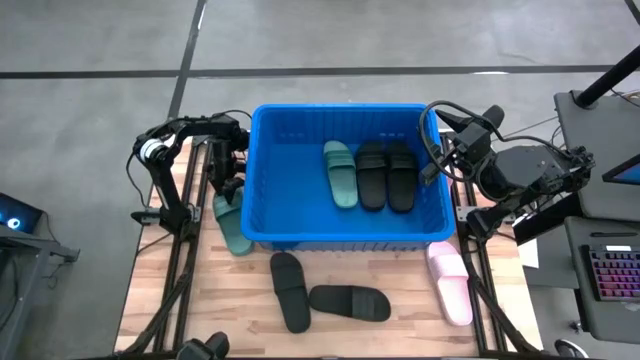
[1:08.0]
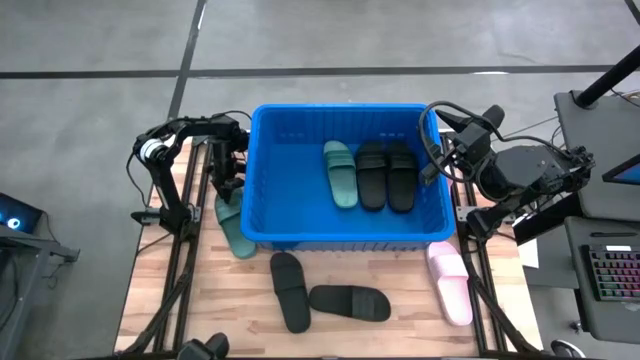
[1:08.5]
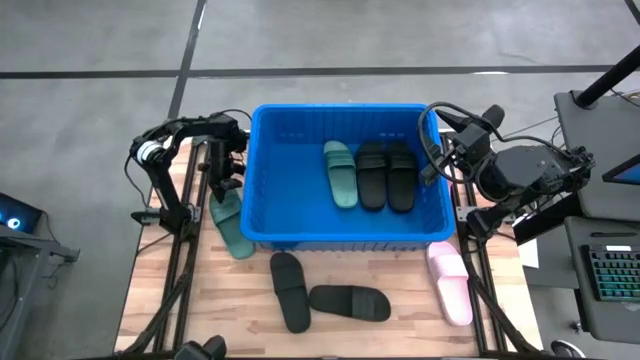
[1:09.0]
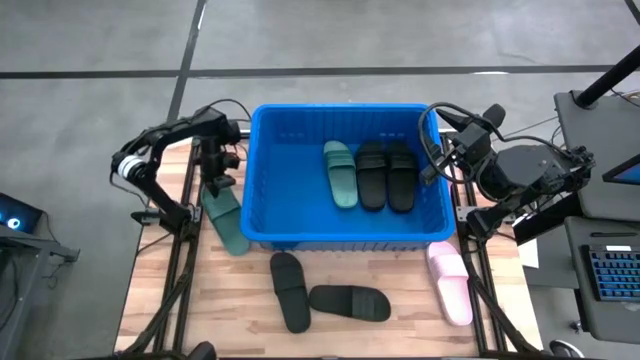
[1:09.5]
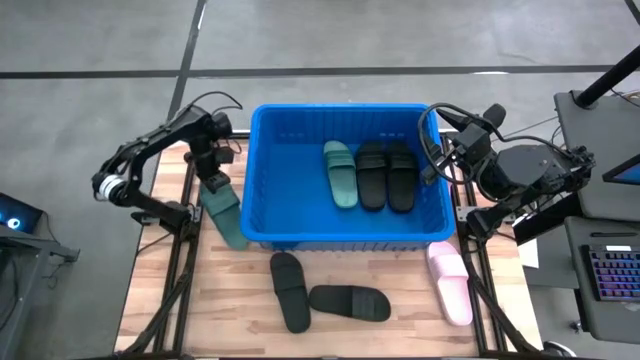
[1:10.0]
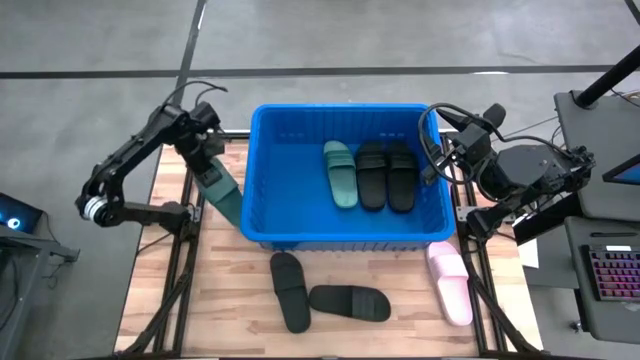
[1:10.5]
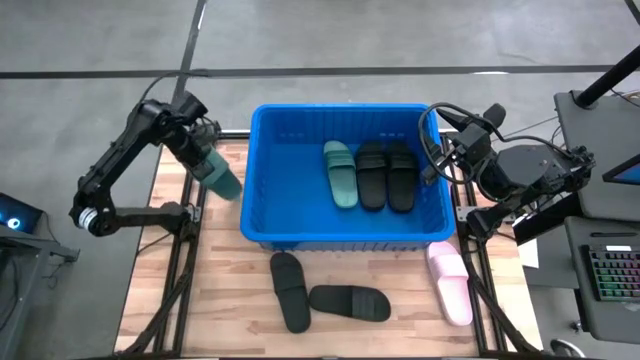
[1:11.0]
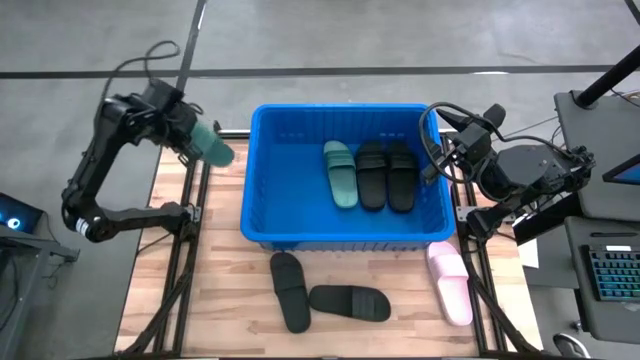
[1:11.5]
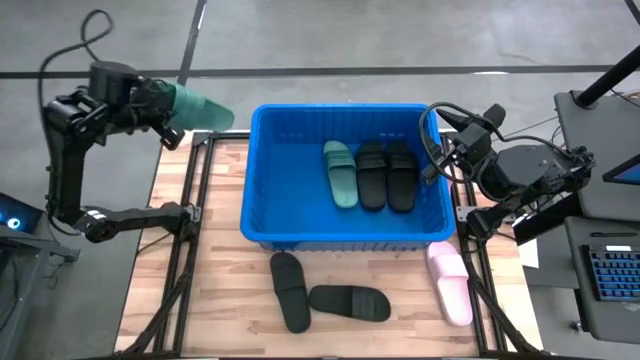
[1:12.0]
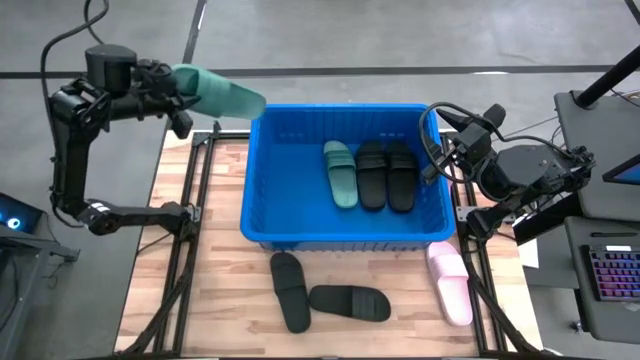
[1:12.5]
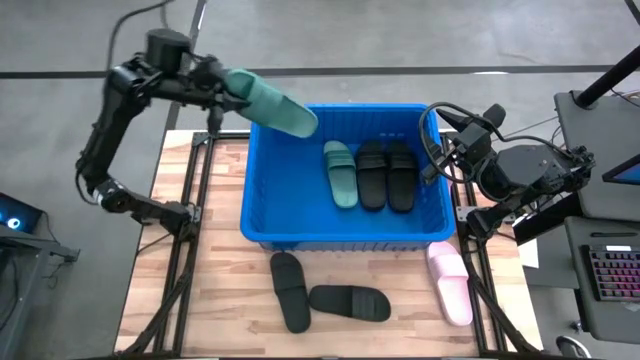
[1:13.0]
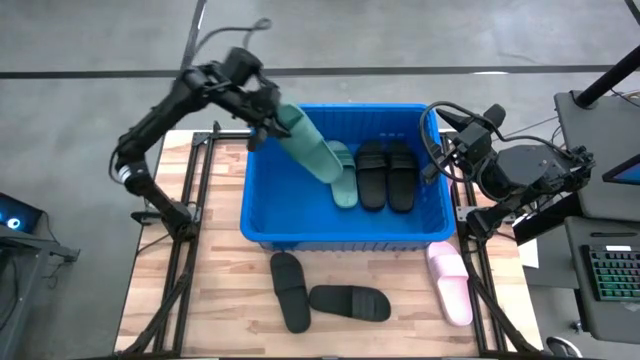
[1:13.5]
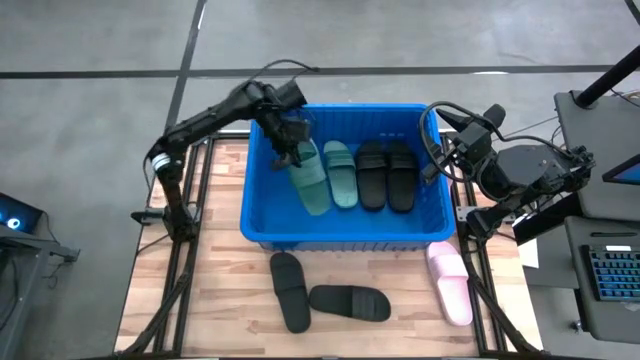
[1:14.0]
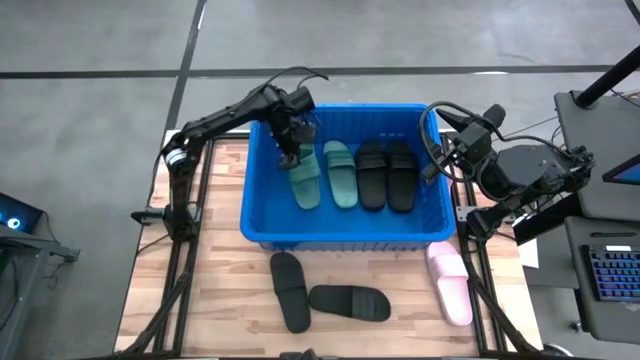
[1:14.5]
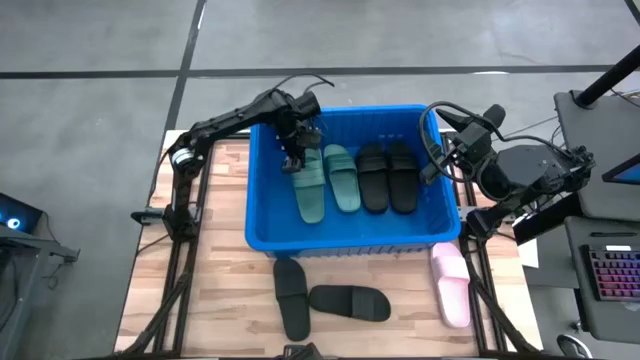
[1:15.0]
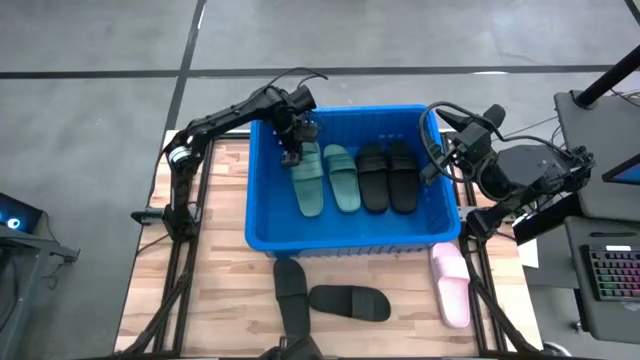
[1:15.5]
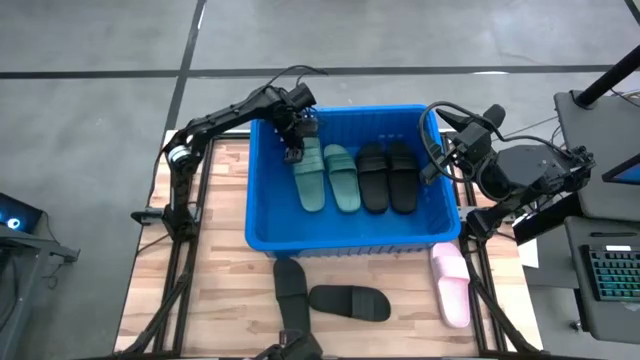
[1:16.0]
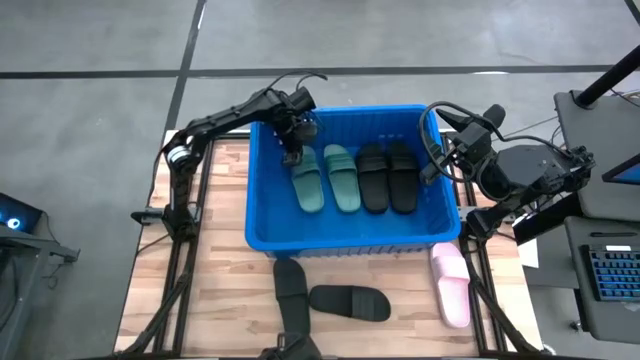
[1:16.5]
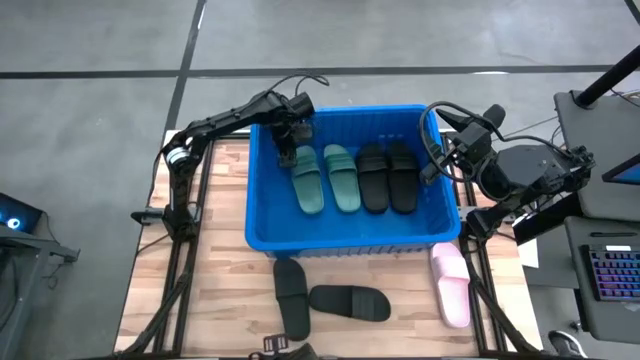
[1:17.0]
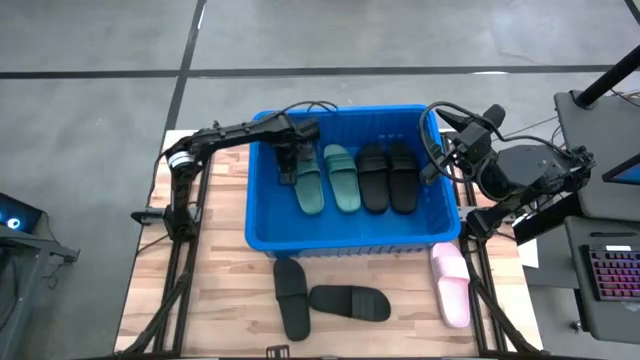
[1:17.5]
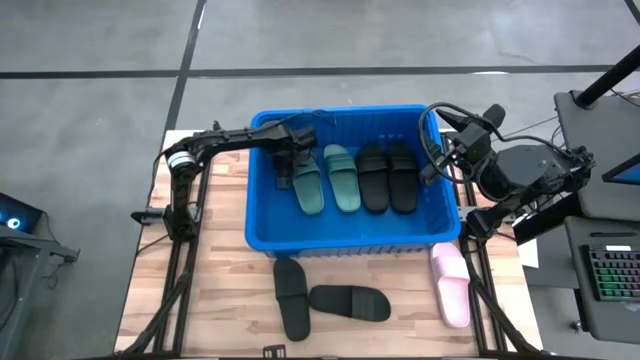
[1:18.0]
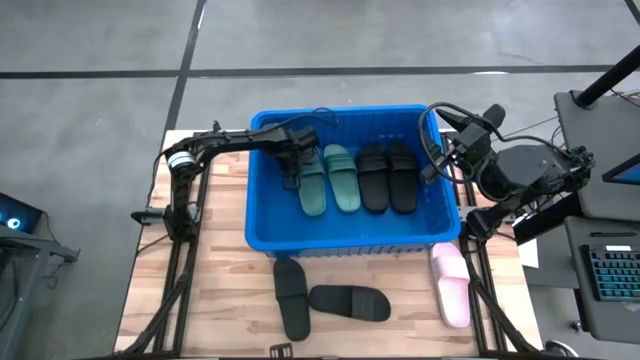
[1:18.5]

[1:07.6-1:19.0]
Task: Pick and place slides into bin
Put the green slide into the blue container

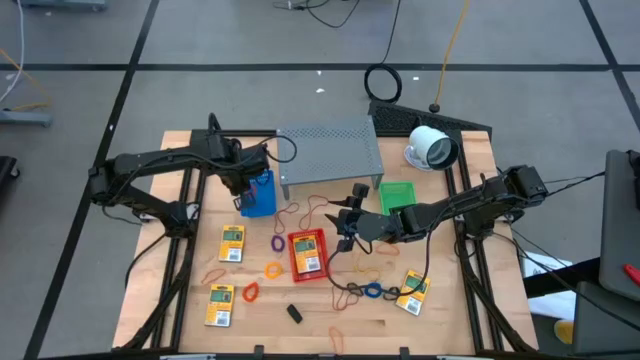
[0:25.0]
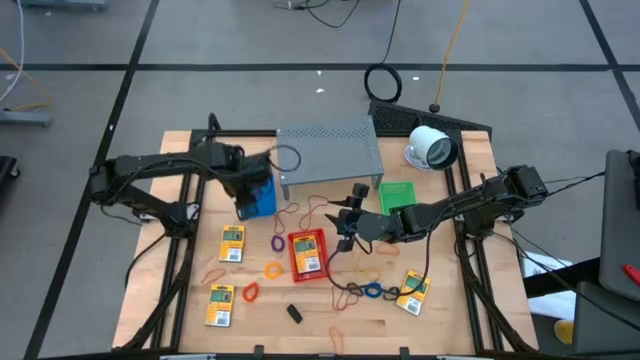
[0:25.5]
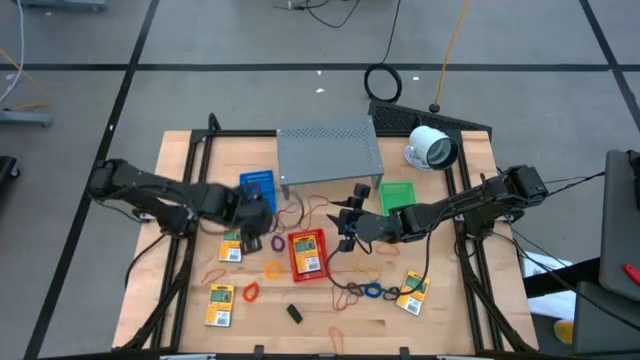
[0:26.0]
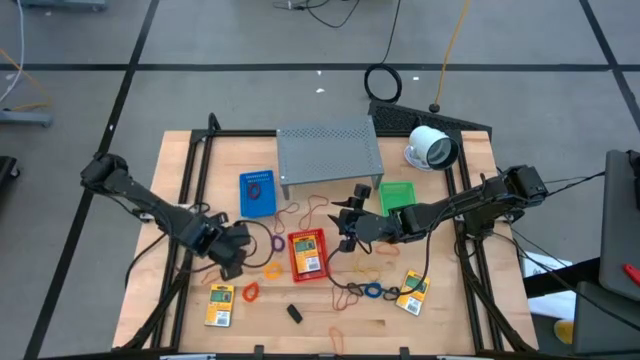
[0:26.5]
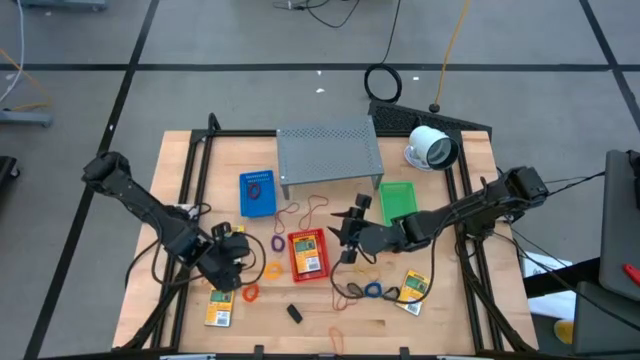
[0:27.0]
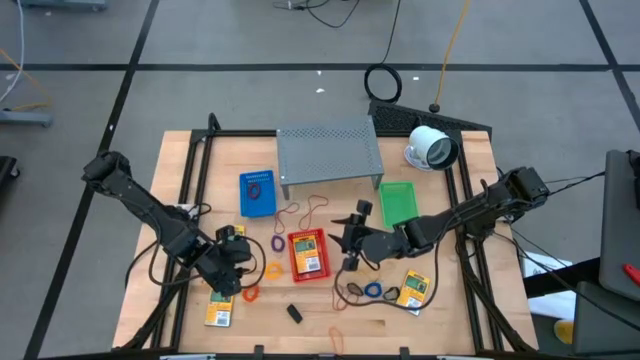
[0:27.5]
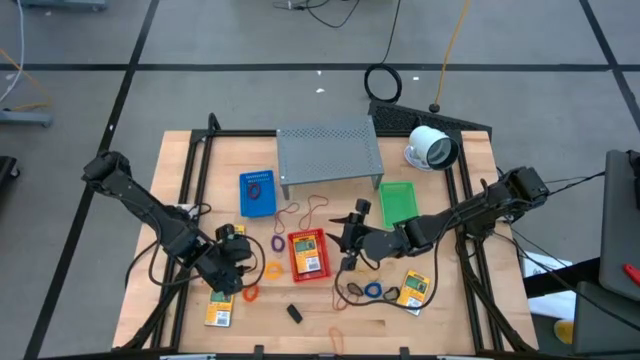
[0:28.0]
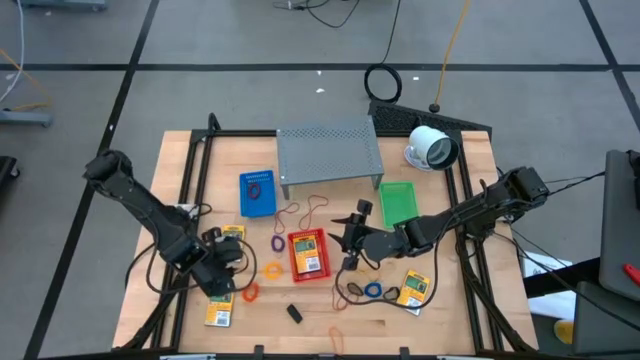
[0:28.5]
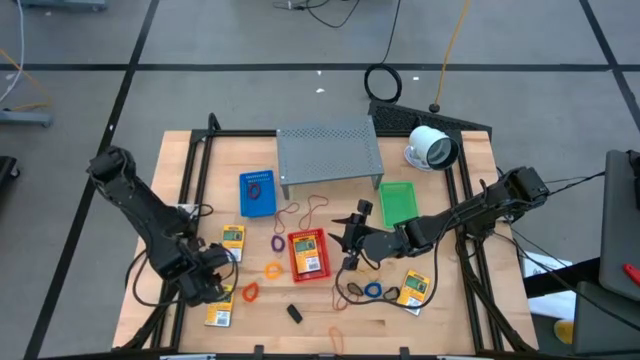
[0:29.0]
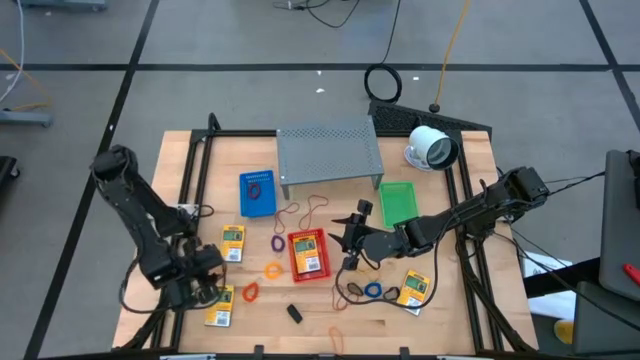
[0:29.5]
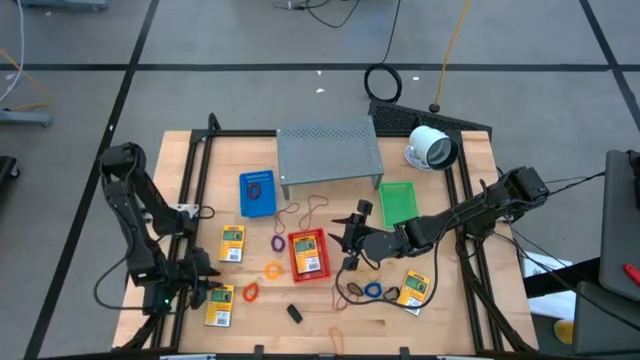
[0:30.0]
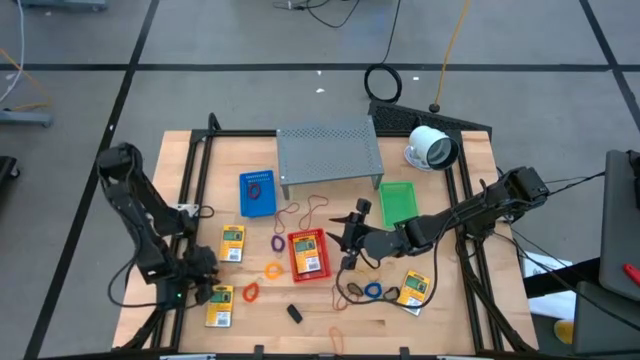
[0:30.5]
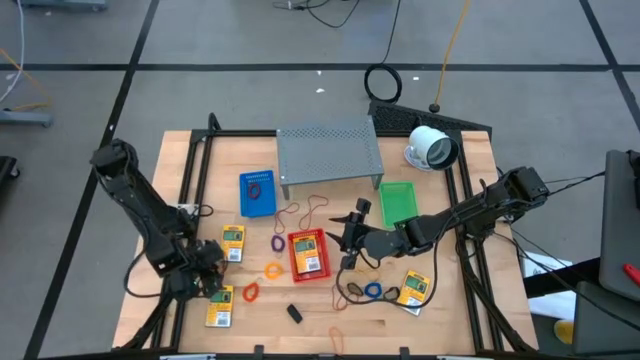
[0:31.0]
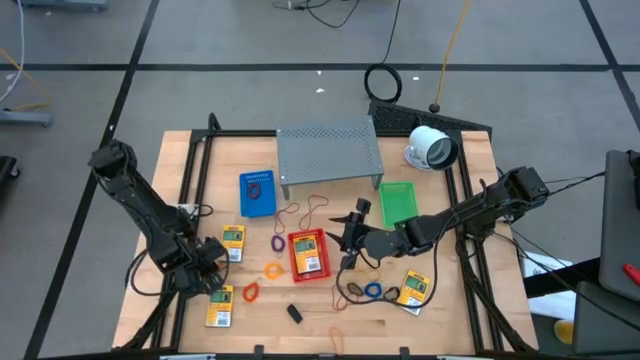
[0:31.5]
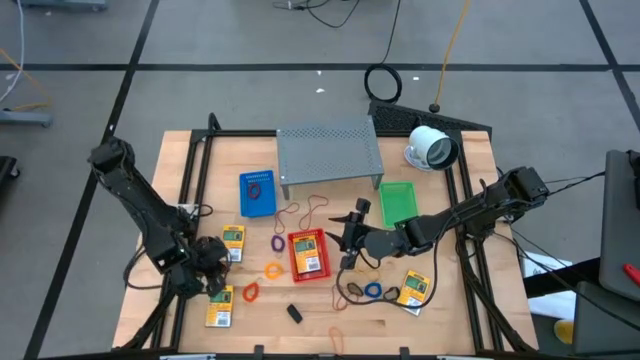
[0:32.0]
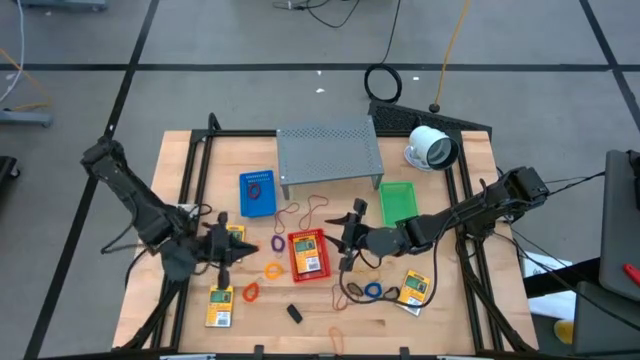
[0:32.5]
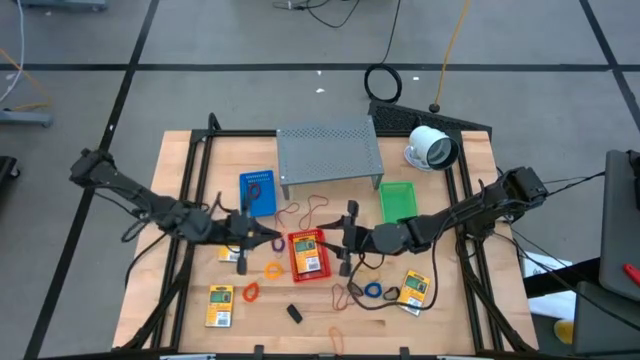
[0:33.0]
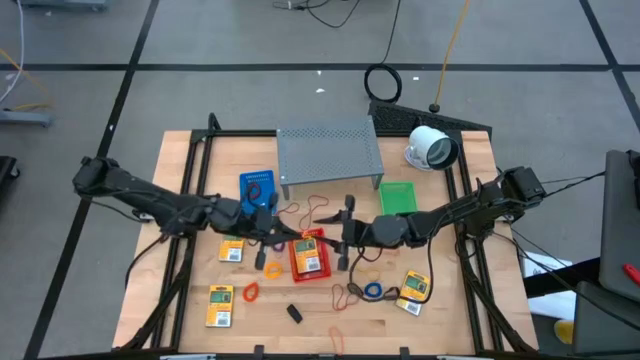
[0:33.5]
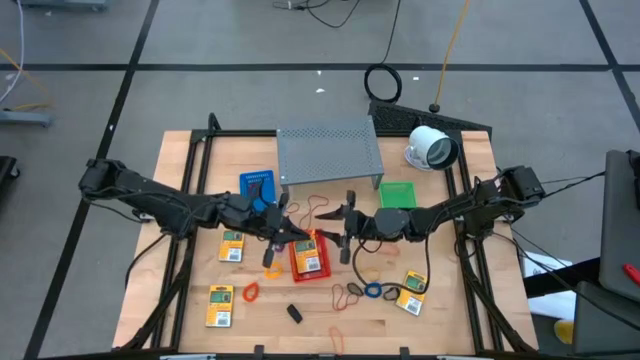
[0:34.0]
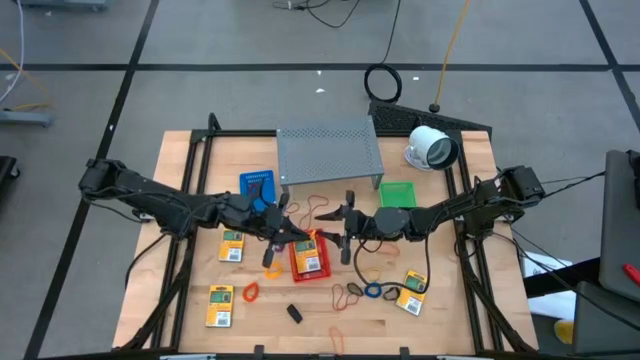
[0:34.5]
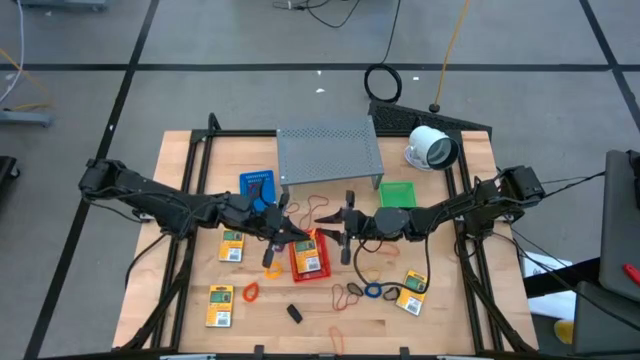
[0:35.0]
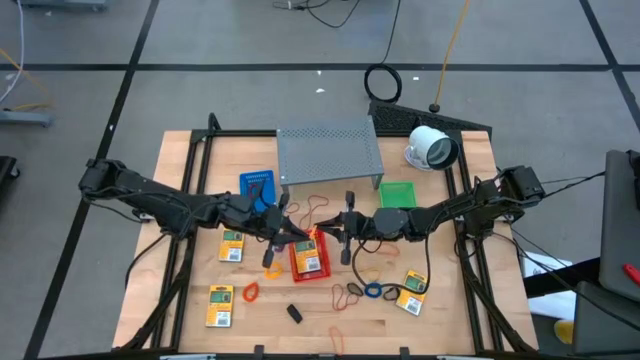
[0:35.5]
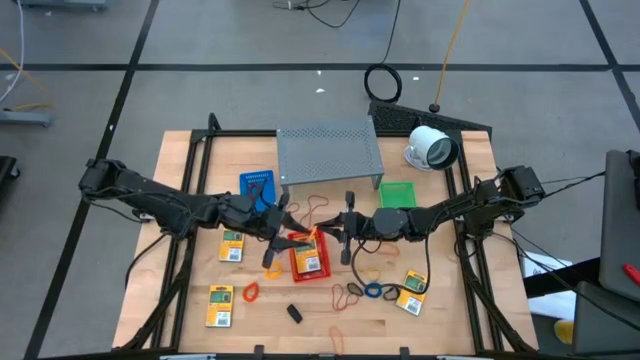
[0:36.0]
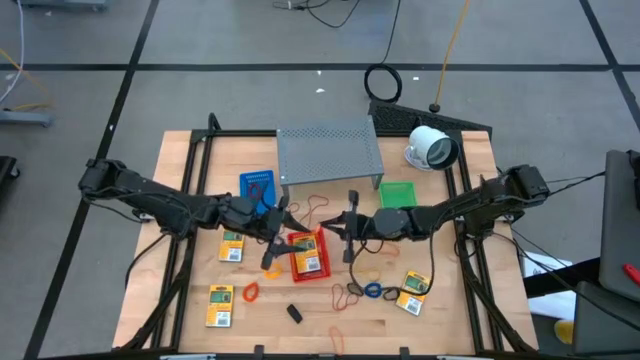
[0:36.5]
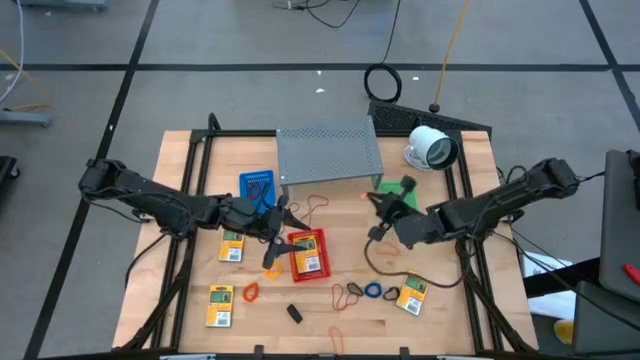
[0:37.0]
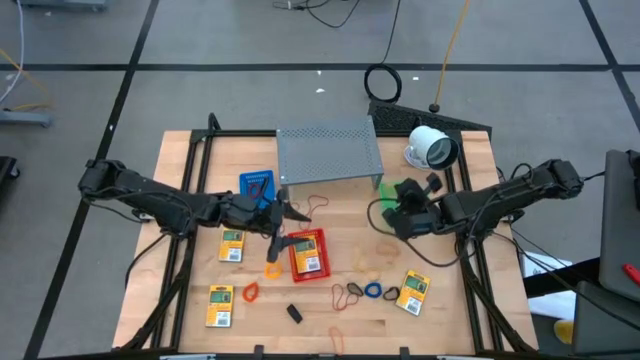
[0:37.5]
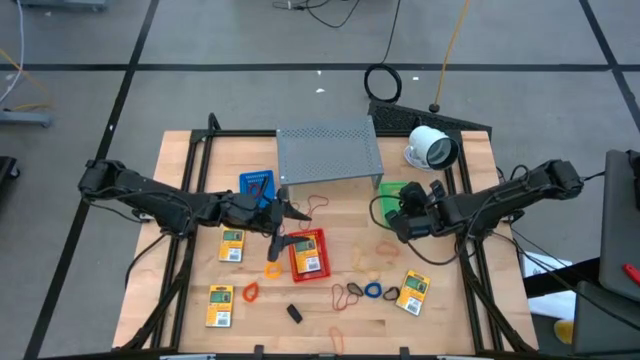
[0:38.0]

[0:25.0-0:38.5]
Task: Pick & Place Office Desk Supplies
Put the middle orange rubber band into the green bin
